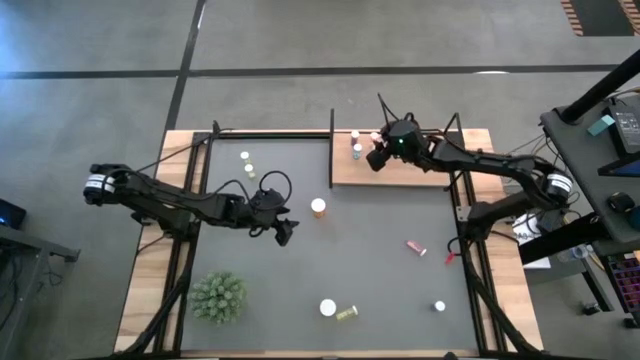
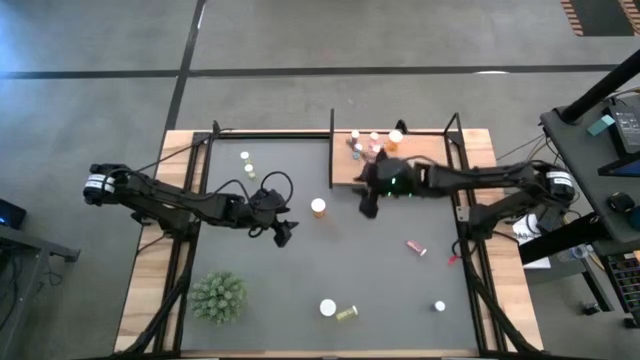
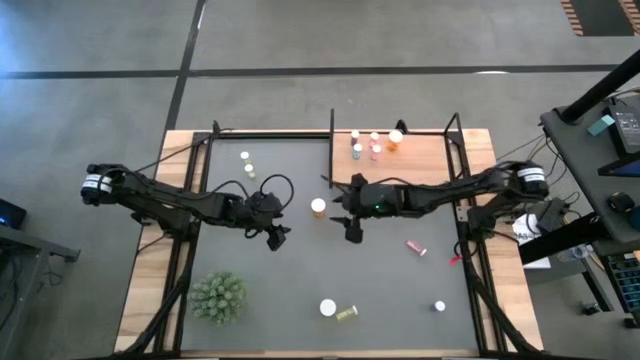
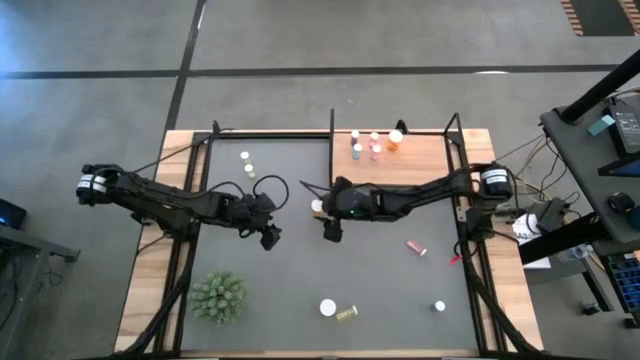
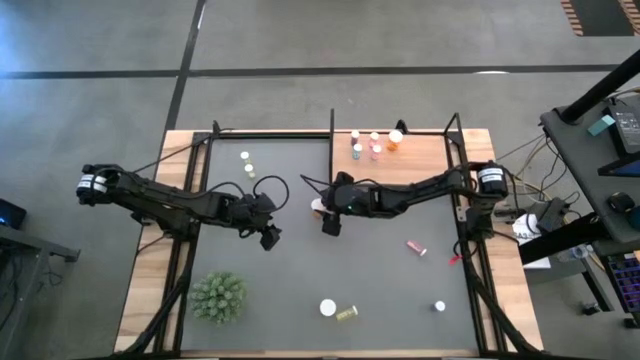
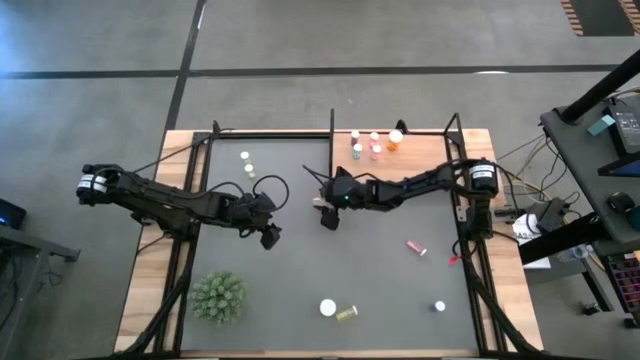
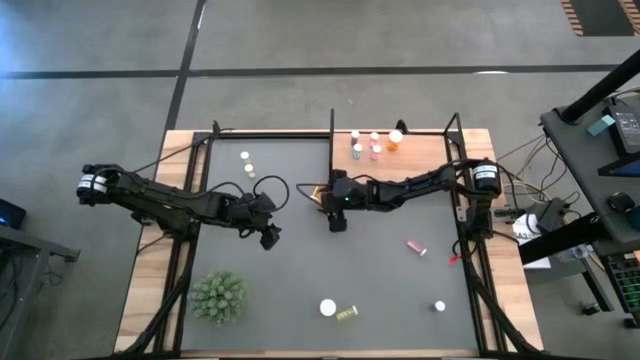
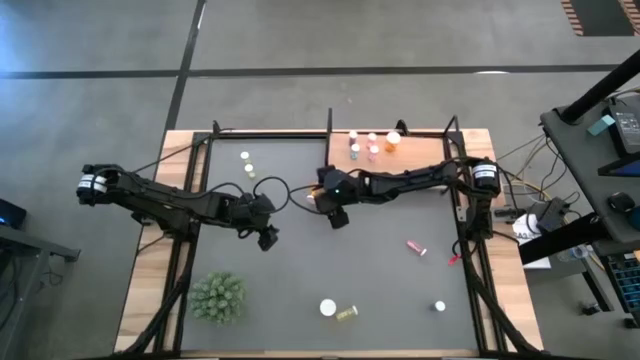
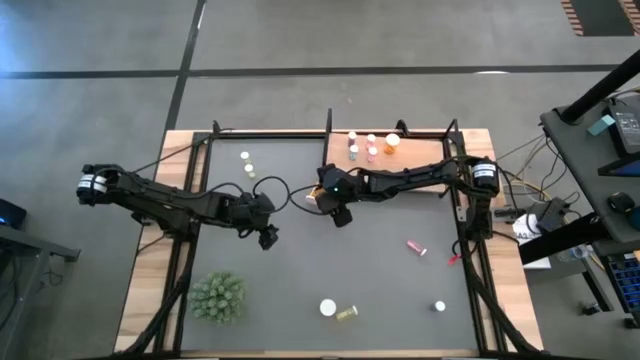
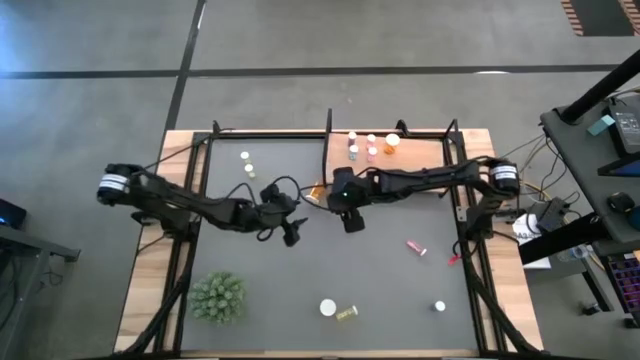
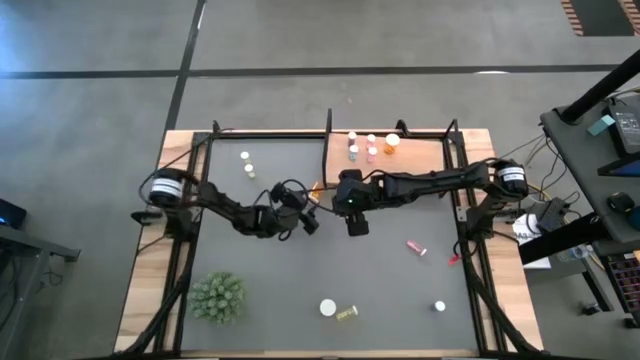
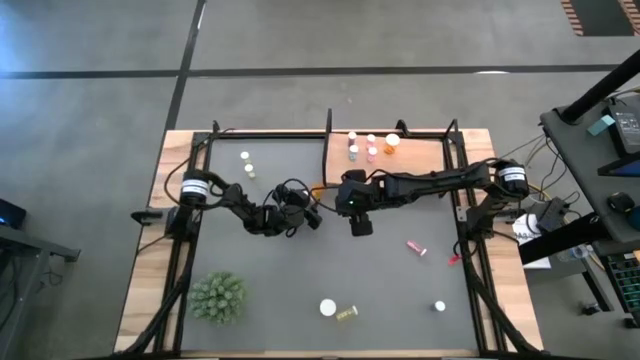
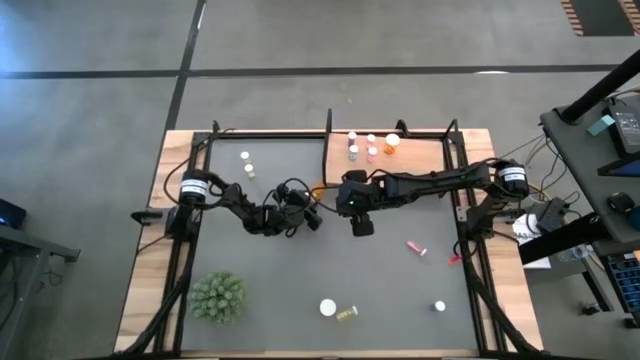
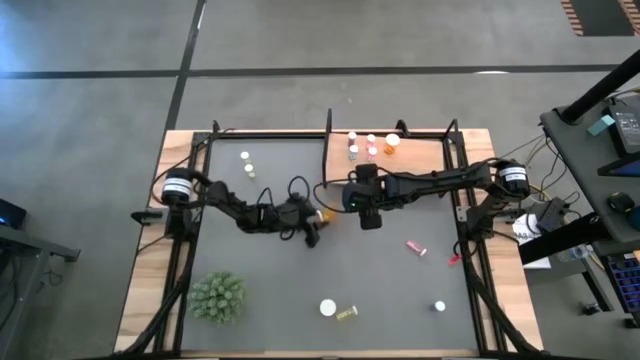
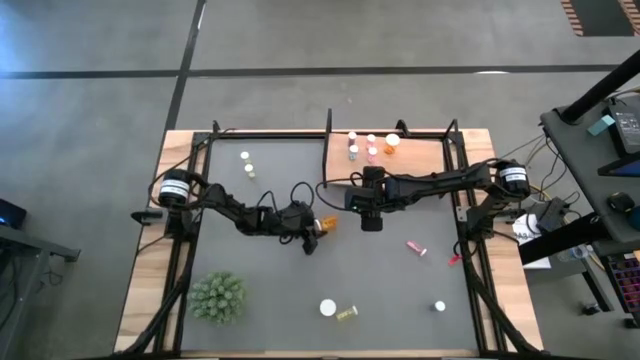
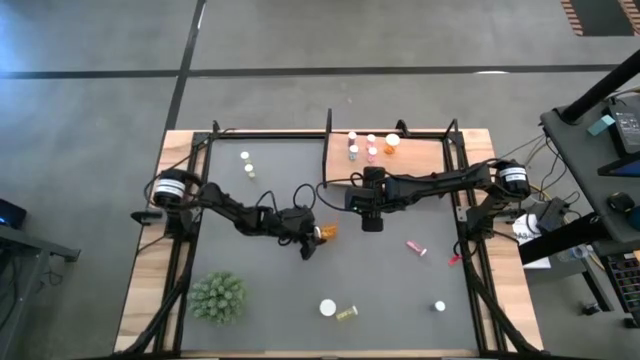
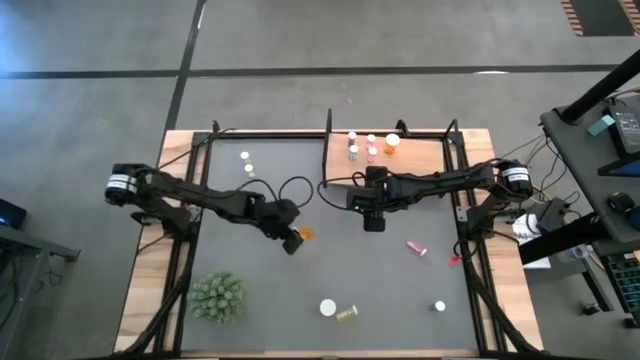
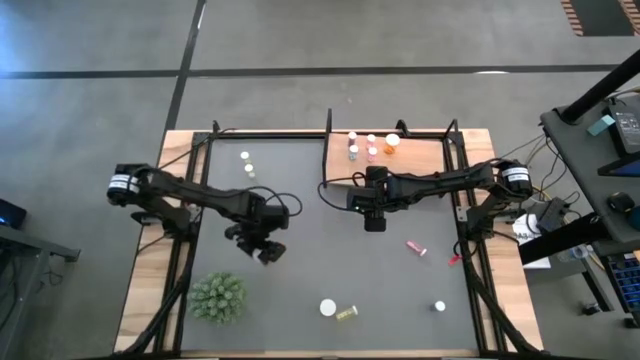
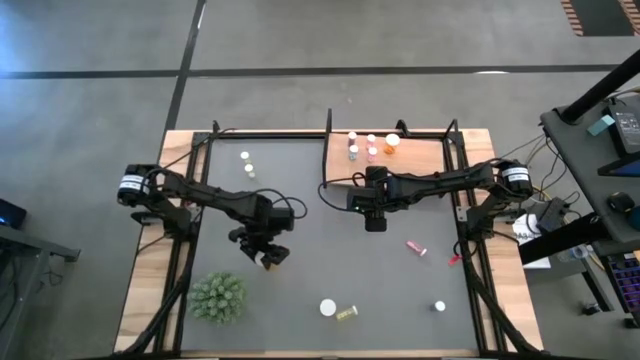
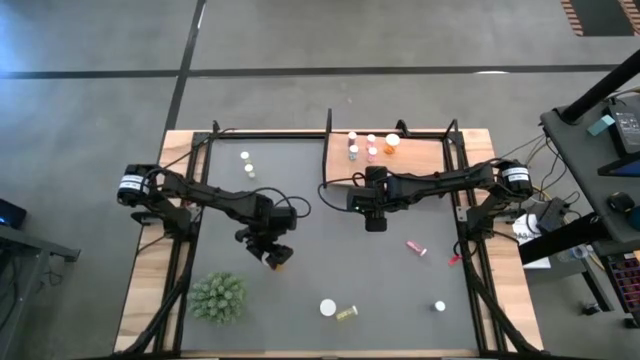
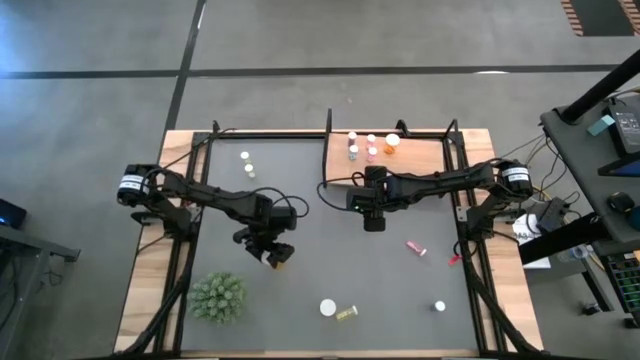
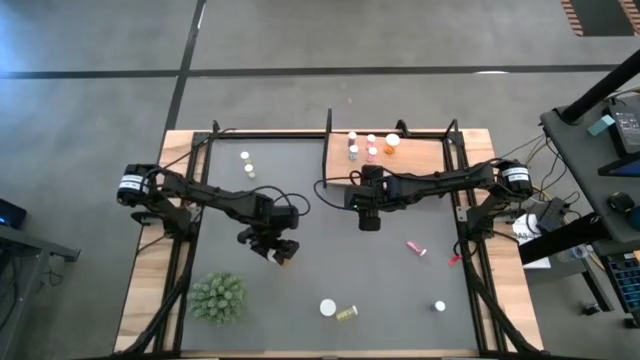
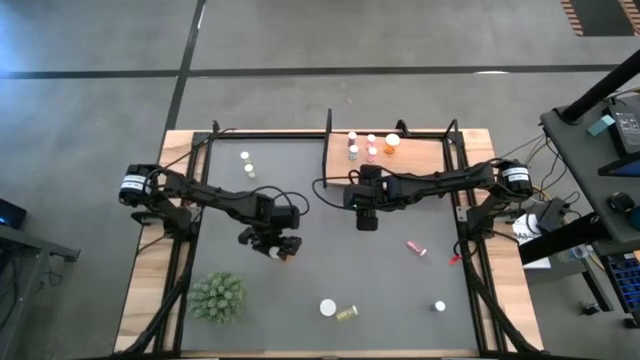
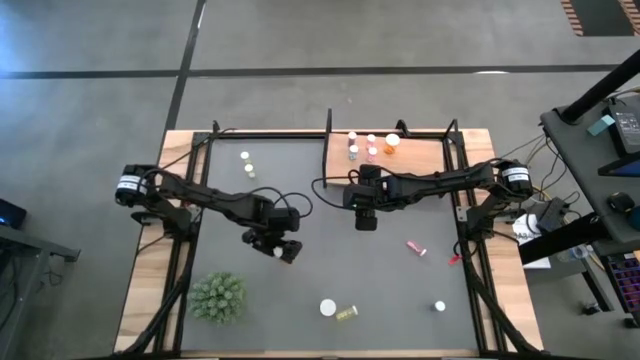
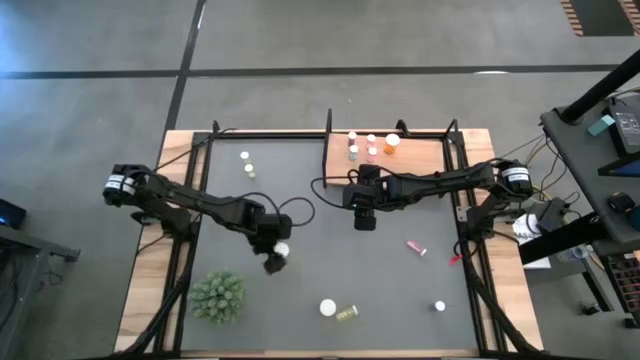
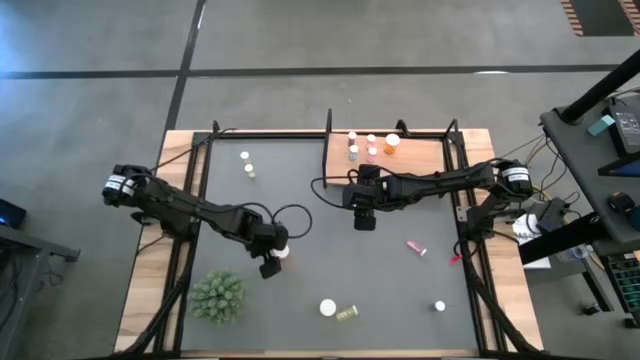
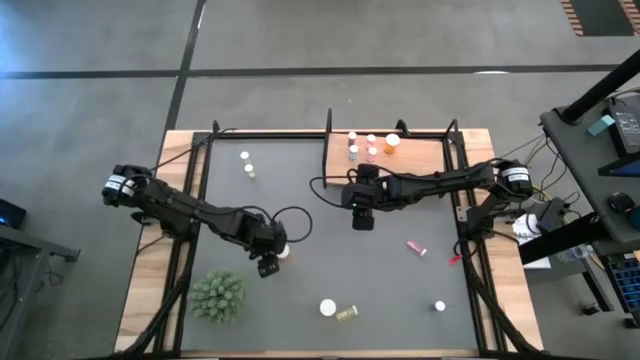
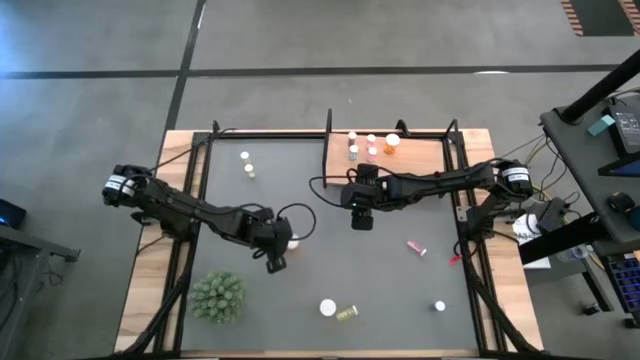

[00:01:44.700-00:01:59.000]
Task: Pick and place medicine bottles onto shelf by color
Put the top orange pill bottle on the shelf aligned with the other orange pill bottle

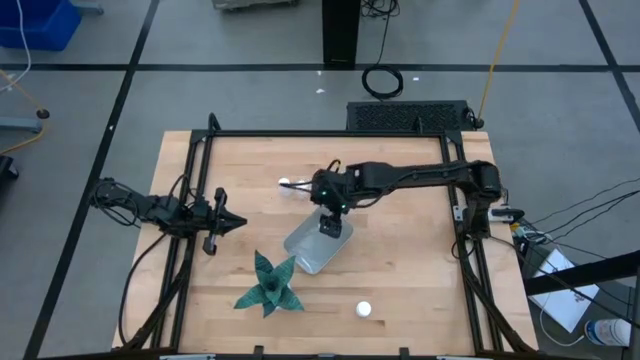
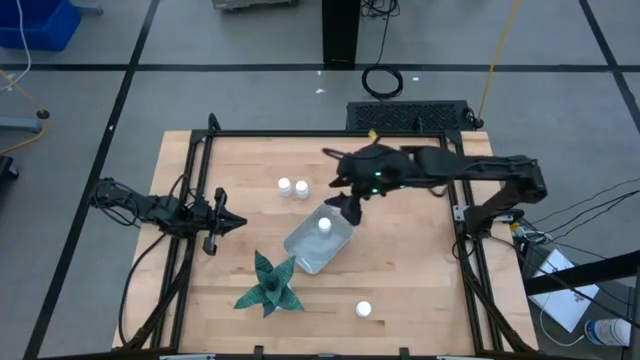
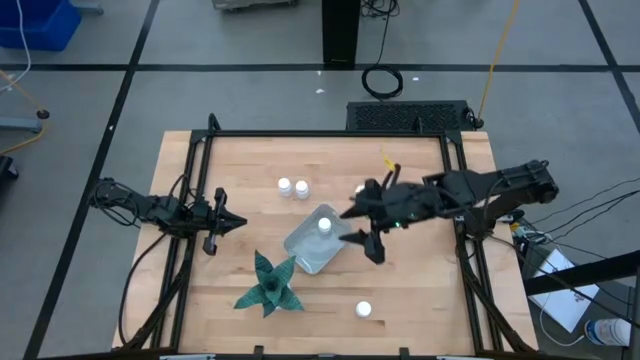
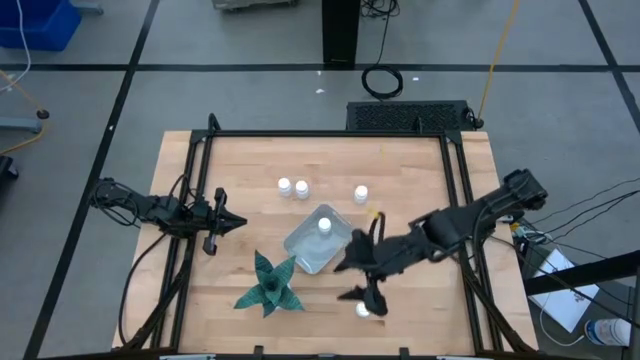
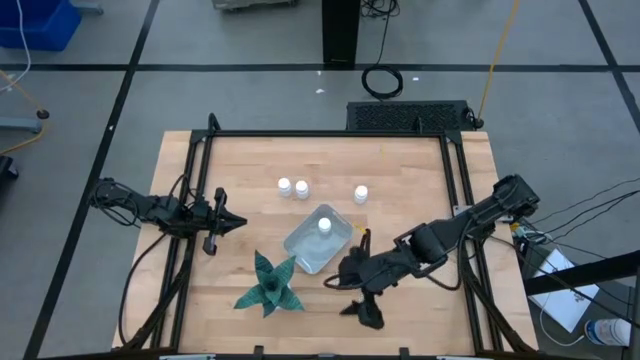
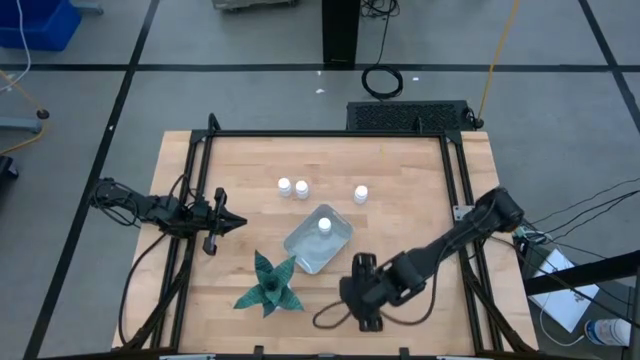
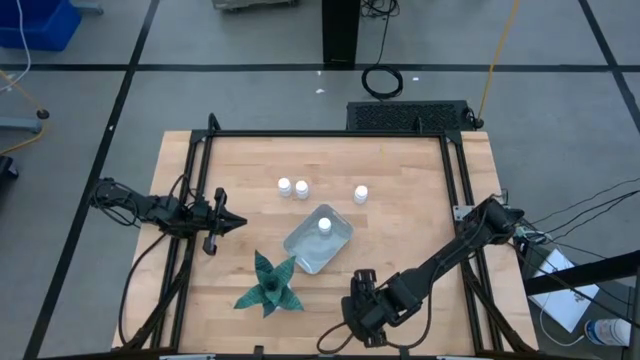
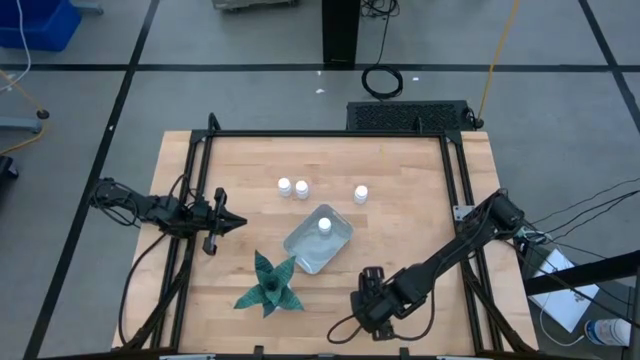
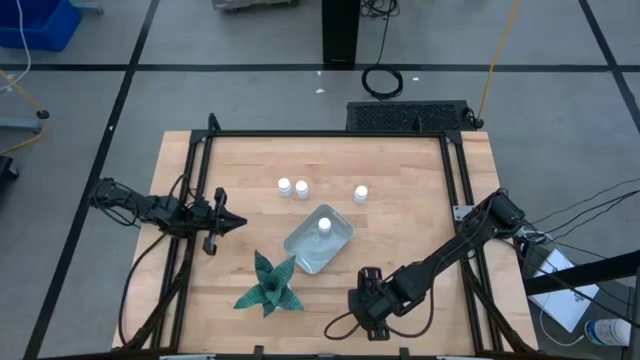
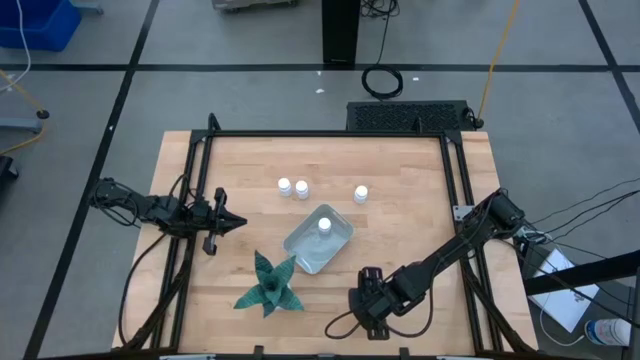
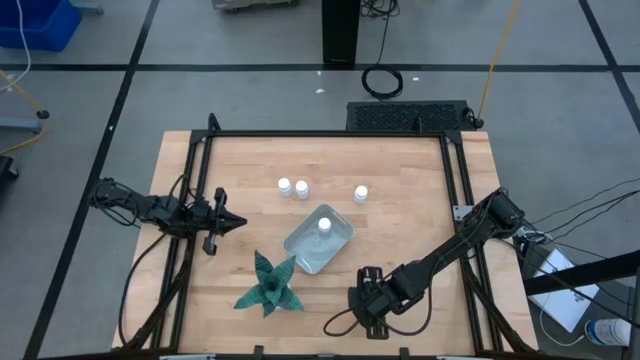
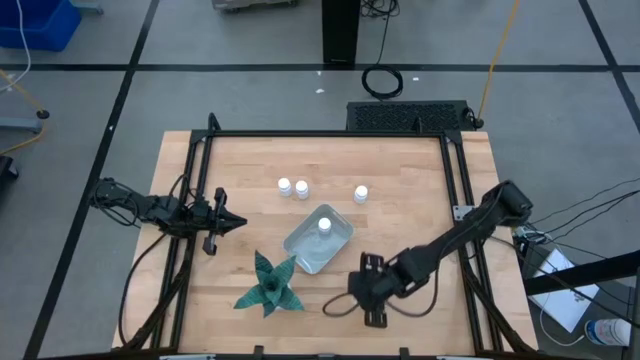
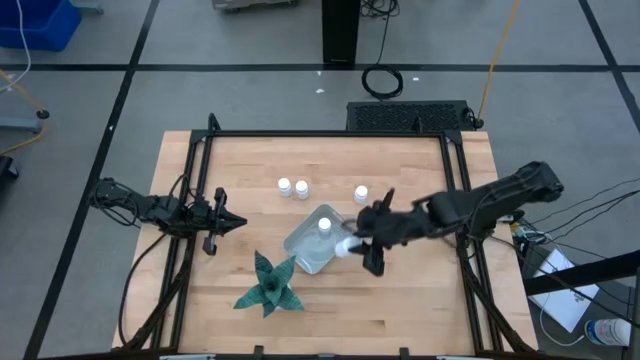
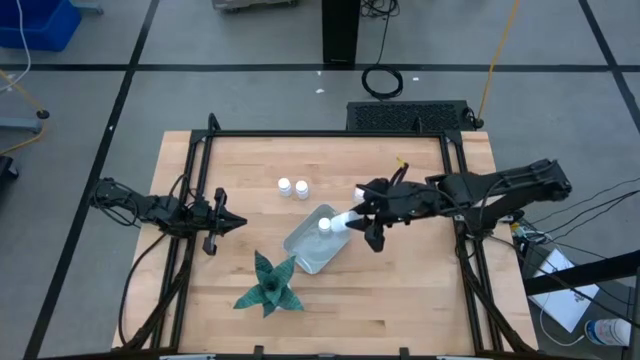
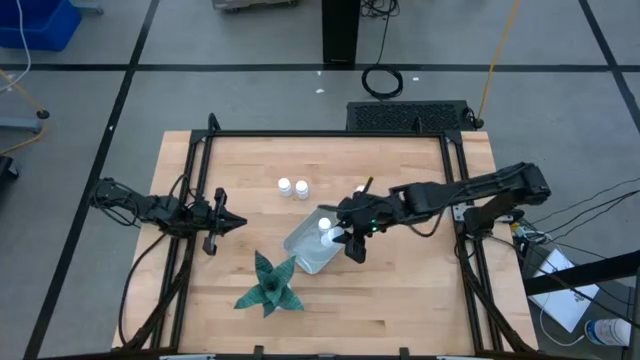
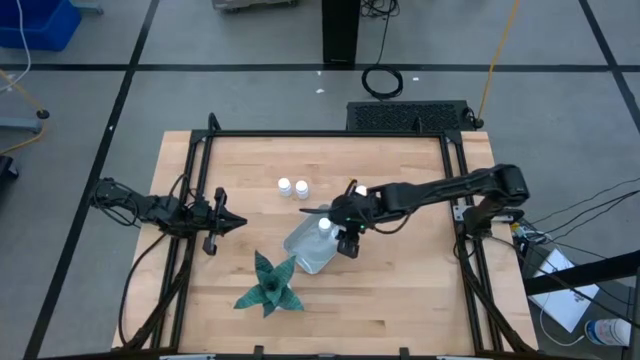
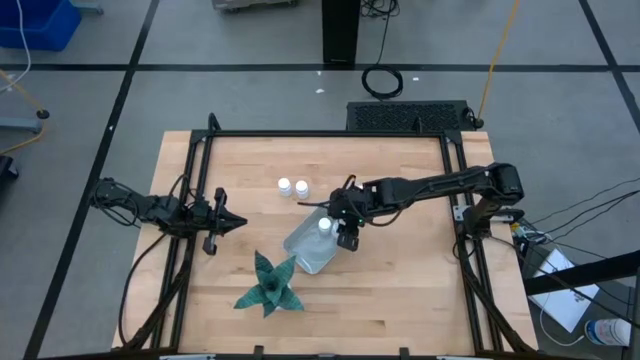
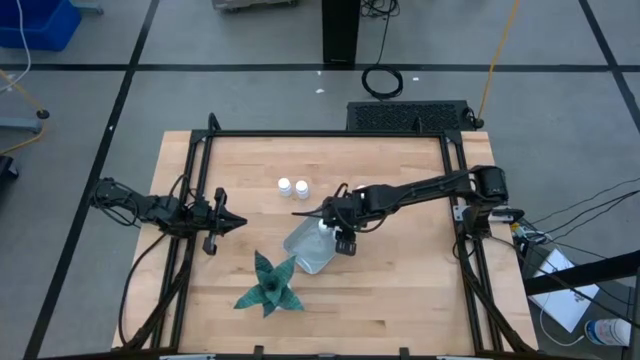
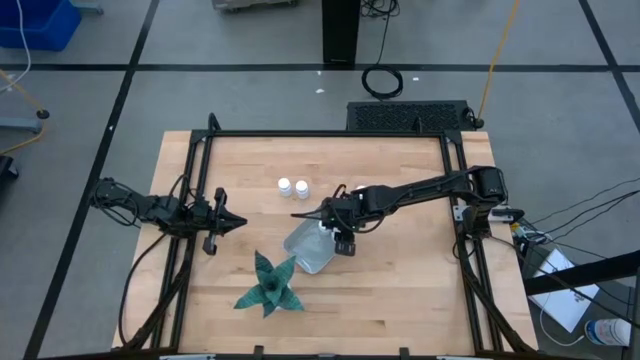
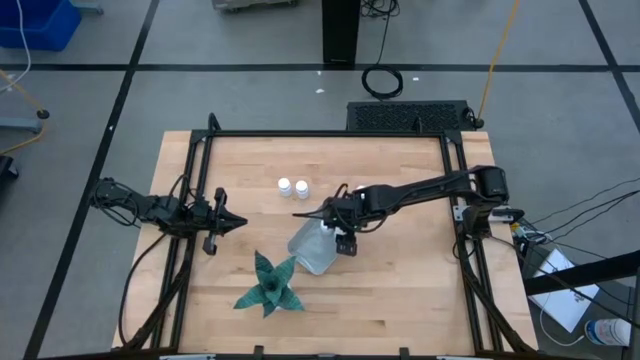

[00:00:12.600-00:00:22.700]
Task: Pick and place pill bottles into a basket
Put the white pill bottle into the gray bin
